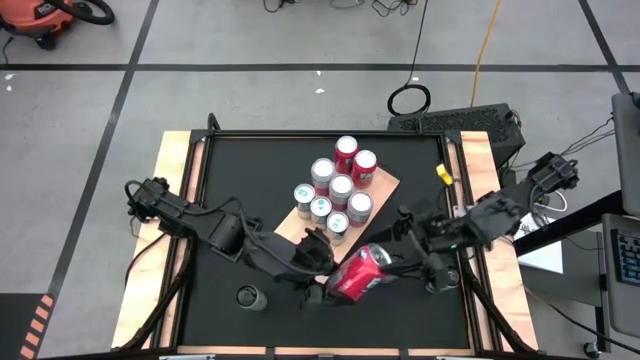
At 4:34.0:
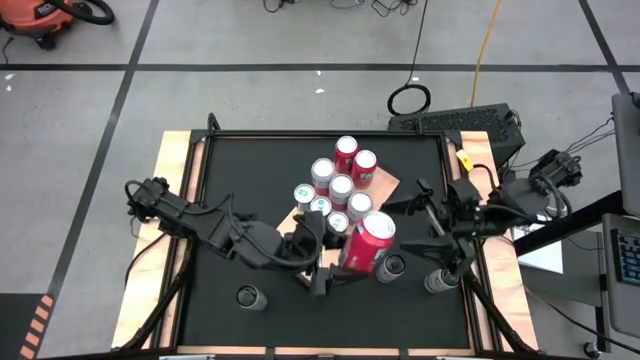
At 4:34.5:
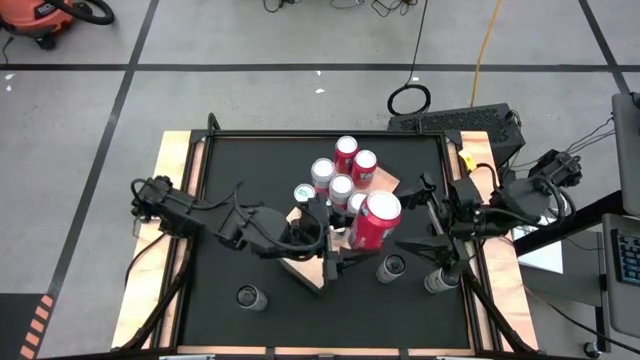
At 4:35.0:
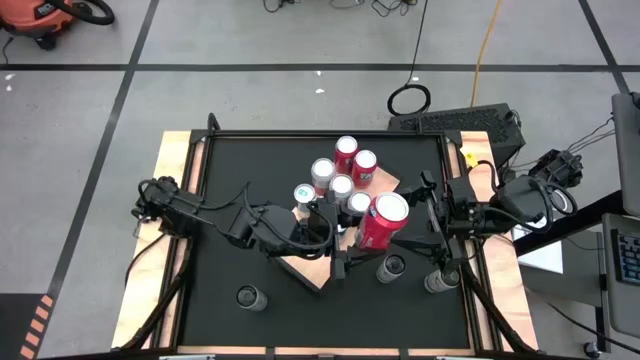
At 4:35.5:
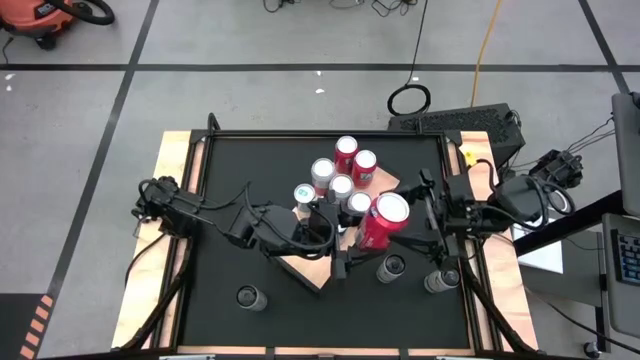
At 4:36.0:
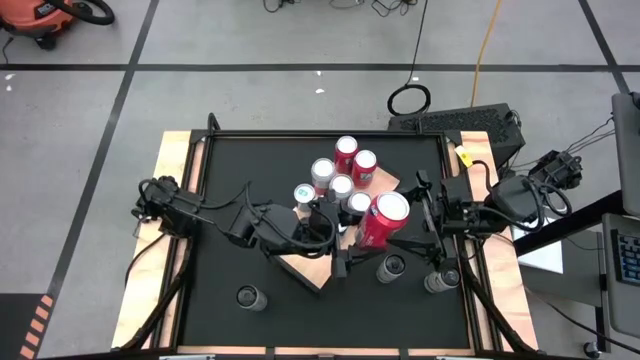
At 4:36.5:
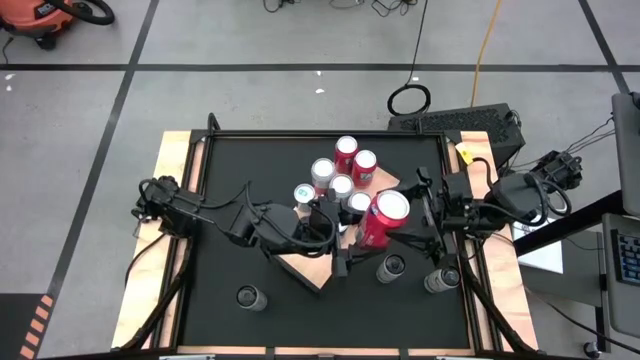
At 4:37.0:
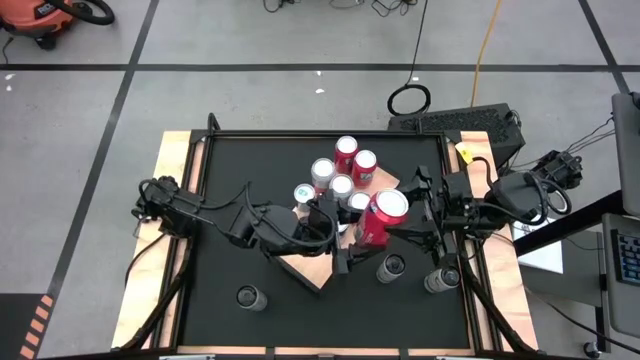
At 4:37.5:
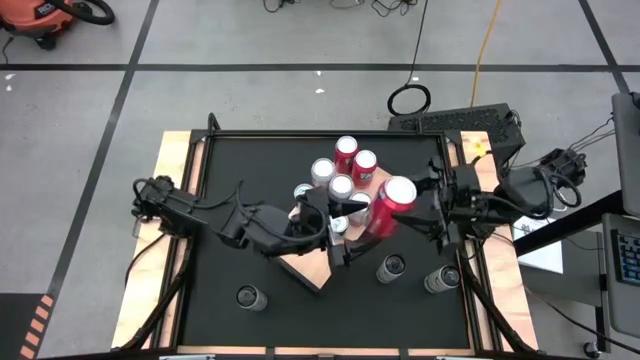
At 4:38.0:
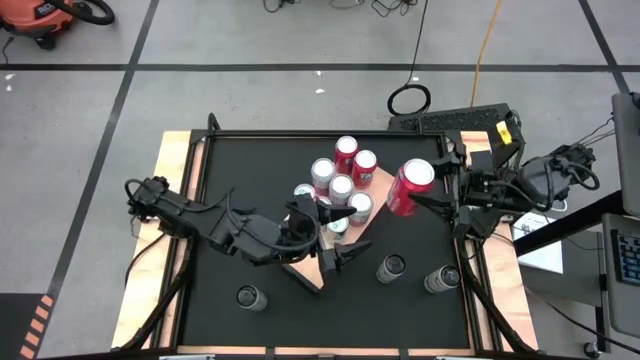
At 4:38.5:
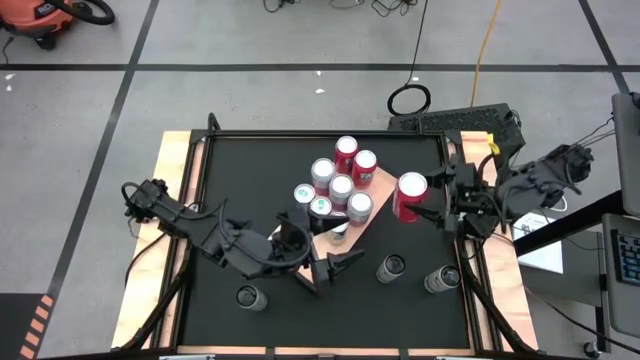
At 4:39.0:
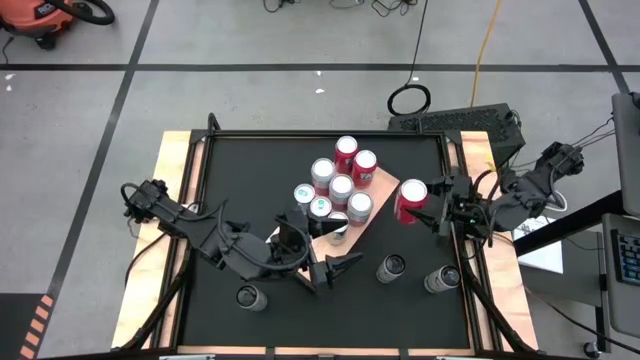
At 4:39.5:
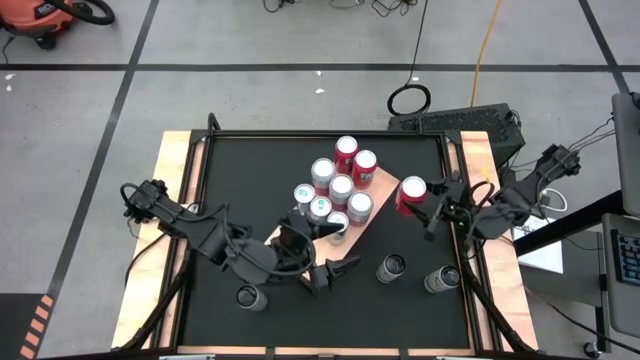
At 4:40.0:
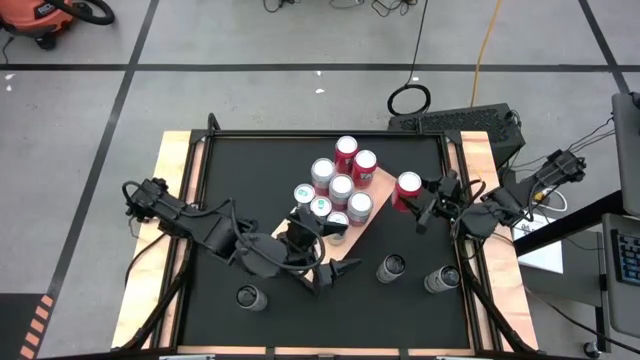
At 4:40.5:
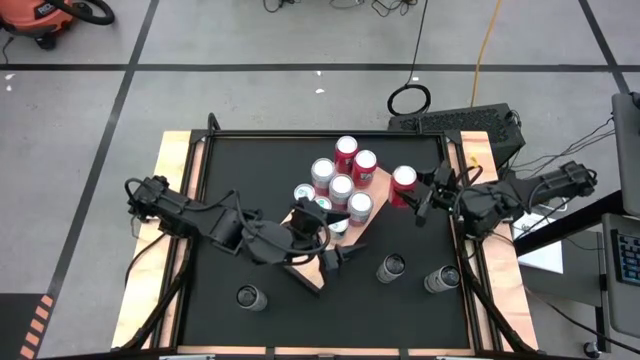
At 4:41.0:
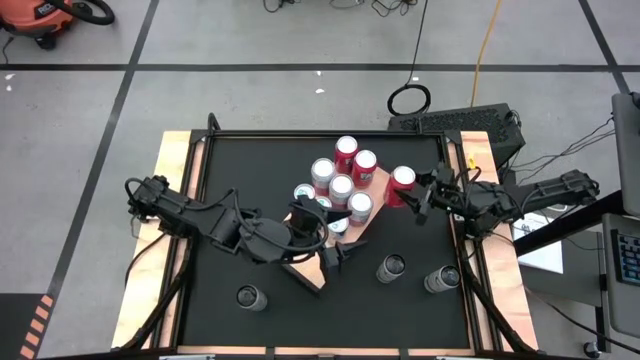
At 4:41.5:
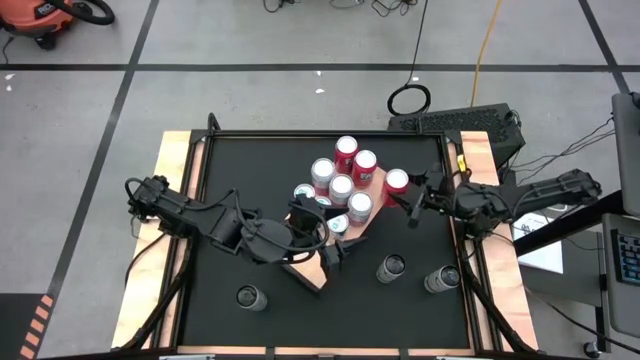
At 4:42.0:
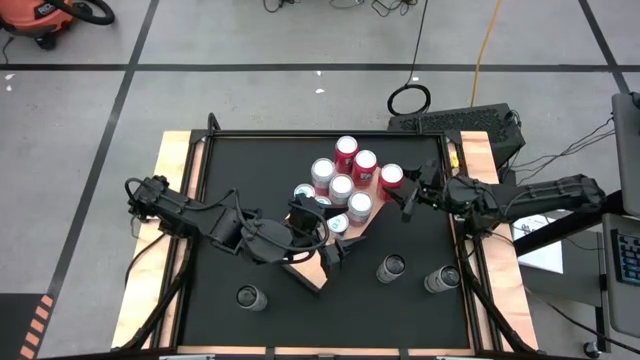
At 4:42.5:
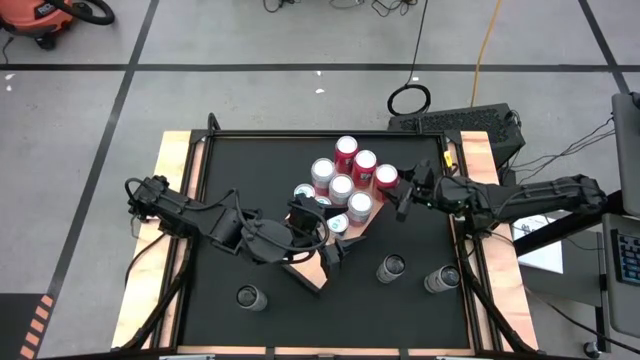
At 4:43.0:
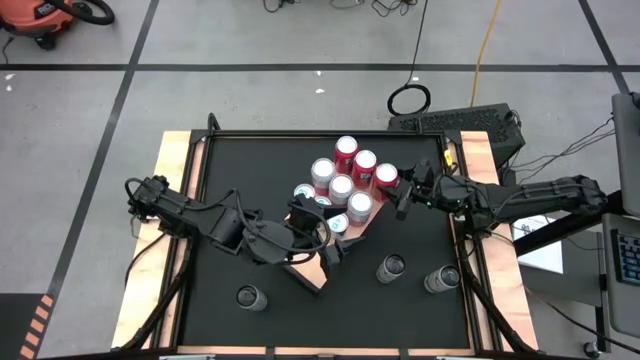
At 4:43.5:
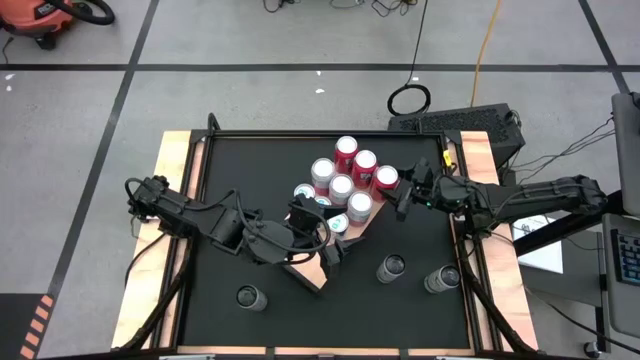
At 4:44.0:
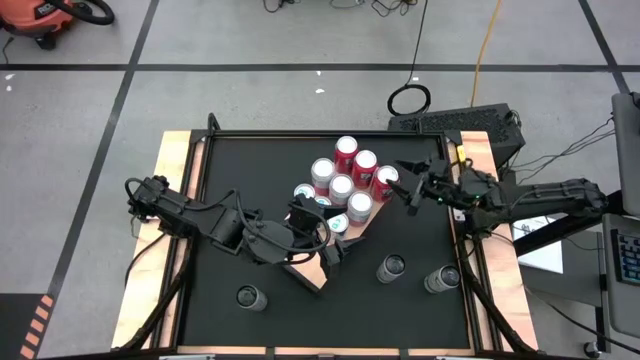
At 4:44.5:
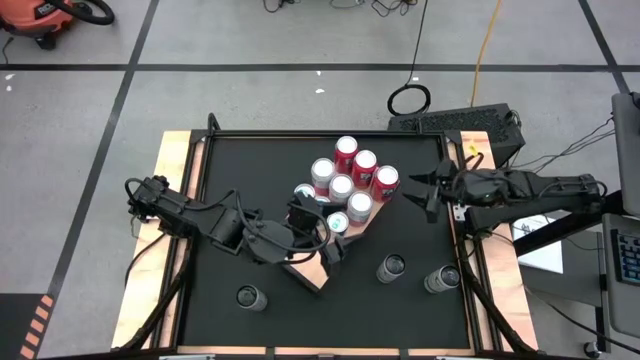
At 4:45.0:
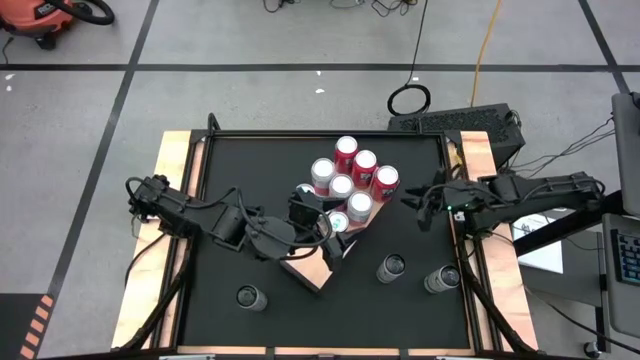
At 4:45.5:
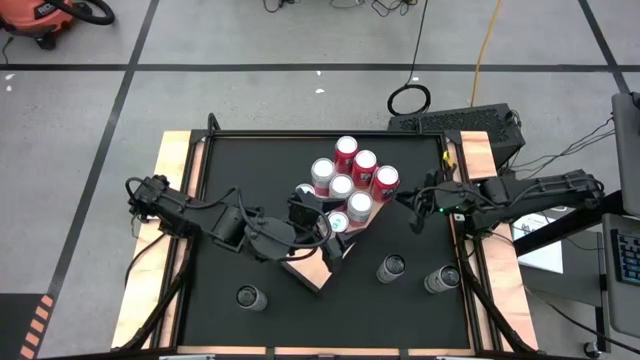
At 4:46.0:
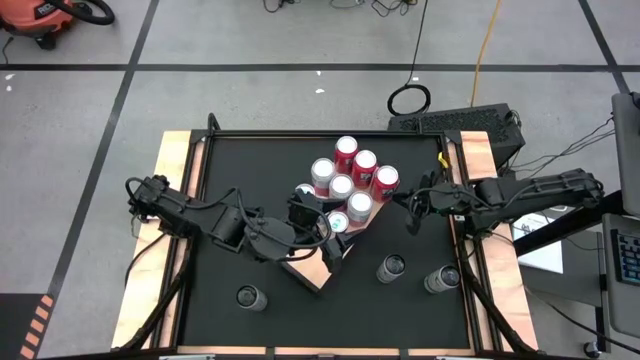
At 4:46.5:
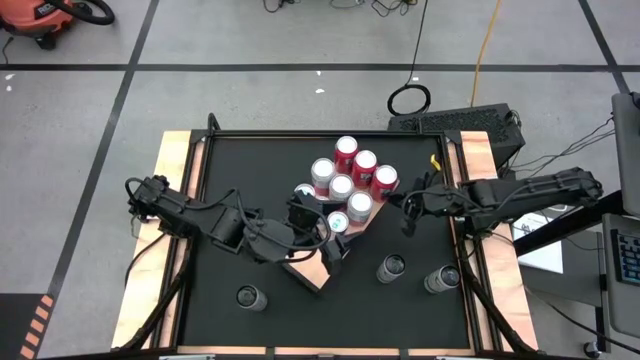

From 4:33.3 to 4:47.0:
Task: Place canned beverage on shelf
Put the red soda can on the shelf aligned with the red soda can

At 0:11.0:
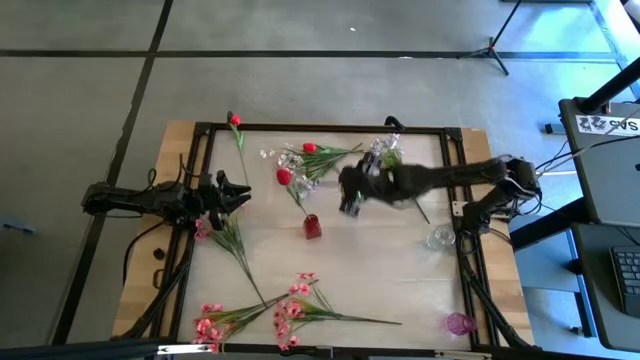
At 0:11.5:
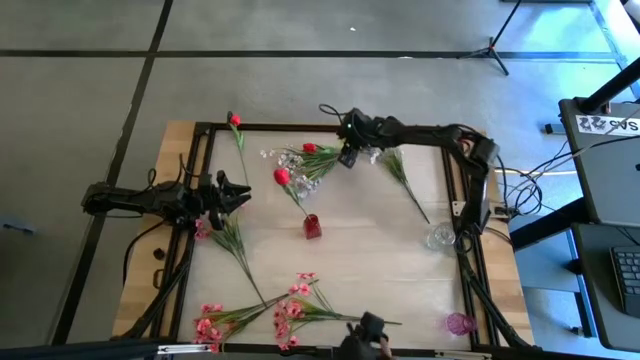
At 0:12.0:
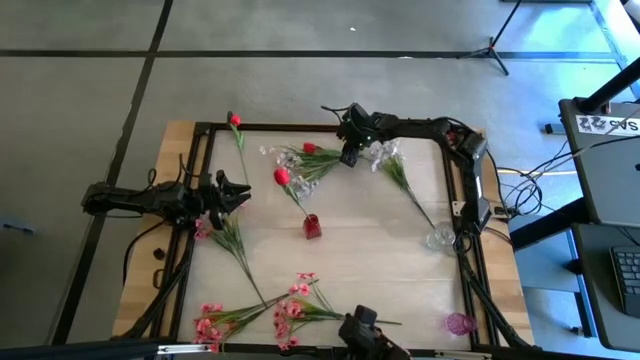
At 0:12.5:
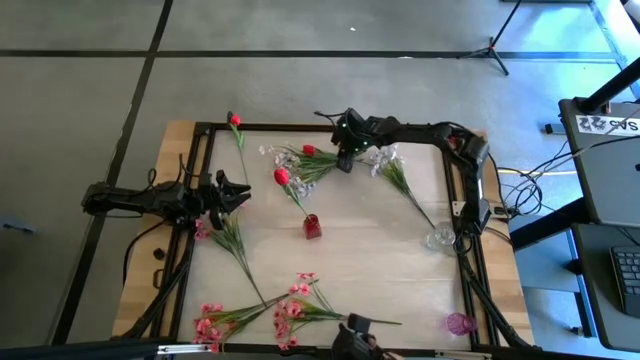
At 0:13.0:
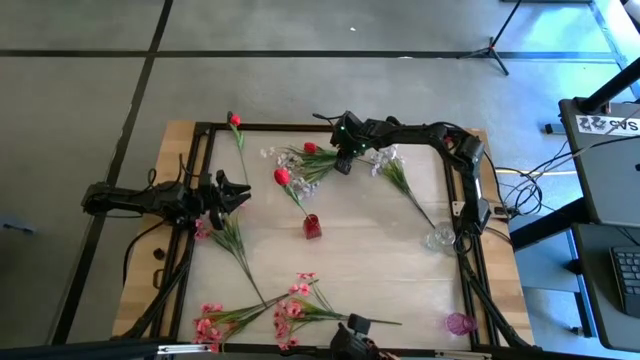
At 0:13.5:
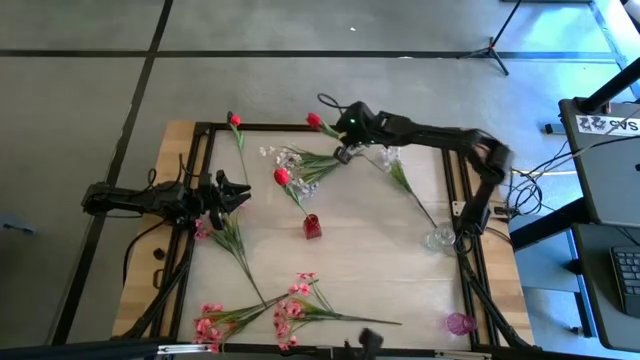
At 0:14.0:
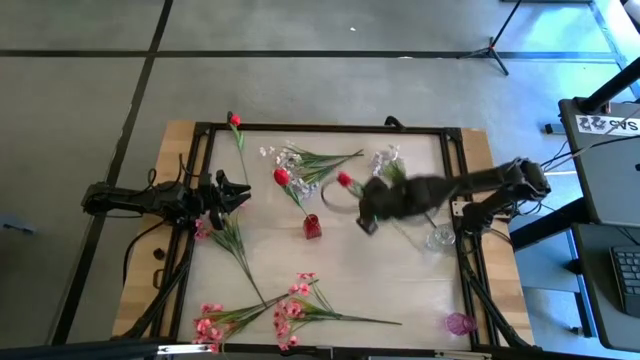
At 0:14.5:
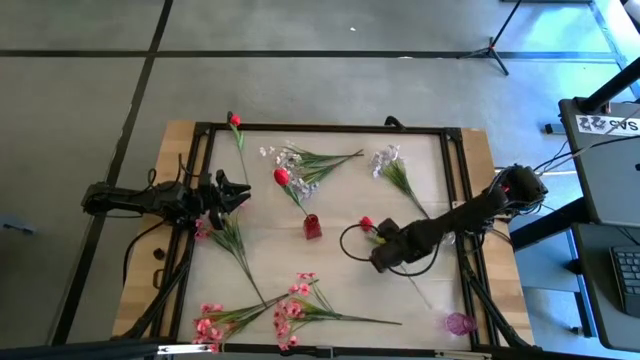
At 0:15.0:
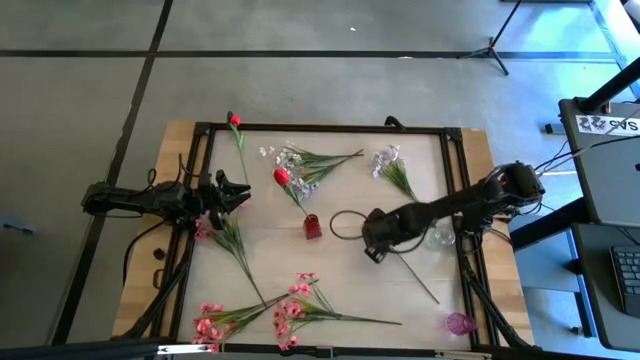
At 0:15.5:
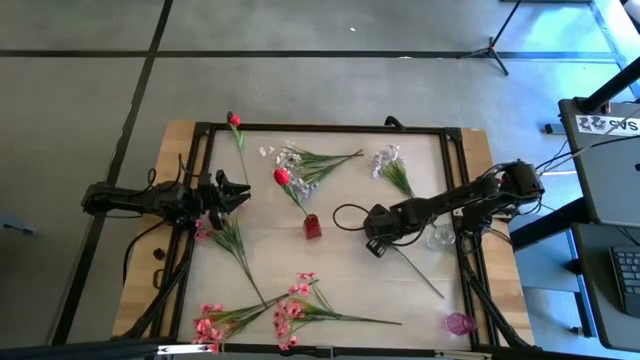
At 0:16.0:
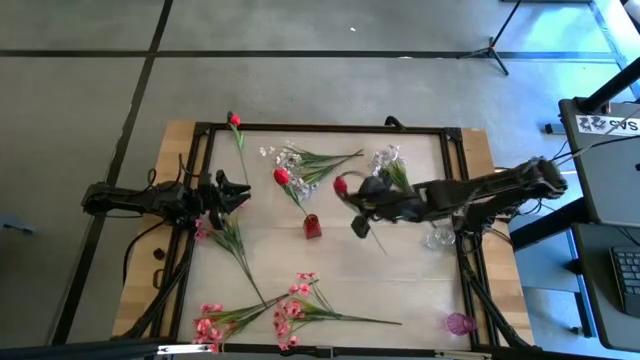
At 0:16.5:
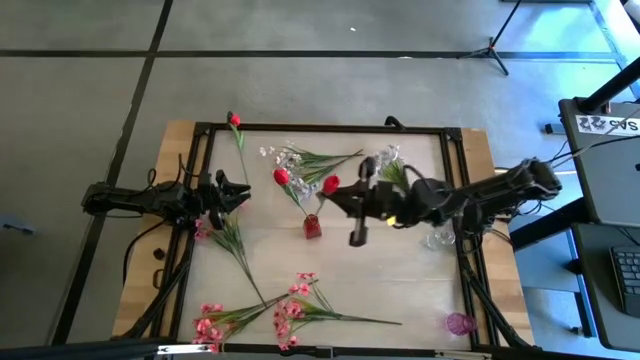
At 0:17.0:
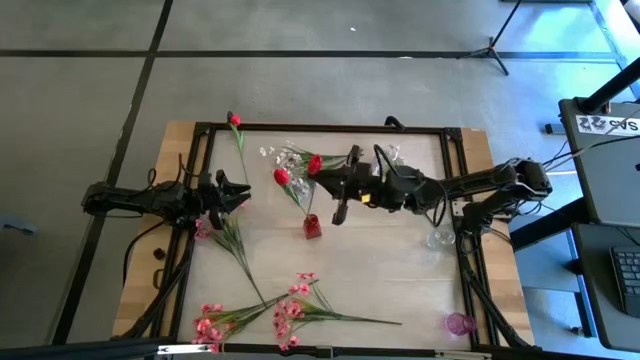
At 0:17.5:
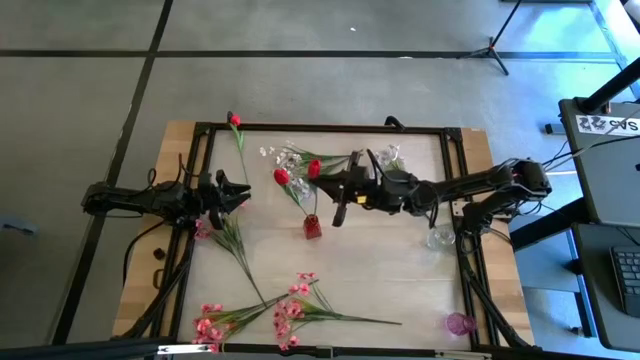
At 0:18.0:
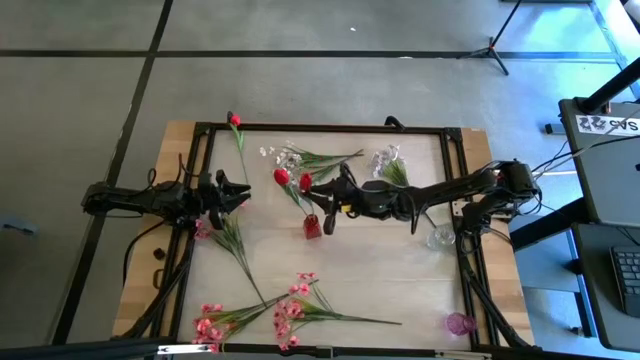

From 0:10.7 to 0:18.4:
Task: Sort flowers into vase by color
Put the right red tulip into the red vase
